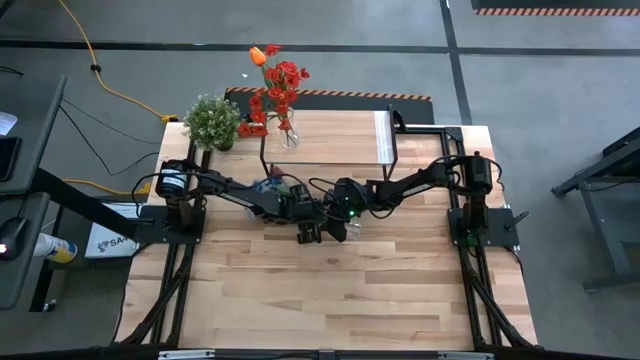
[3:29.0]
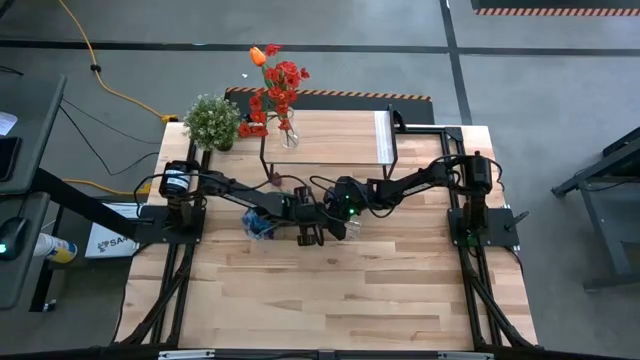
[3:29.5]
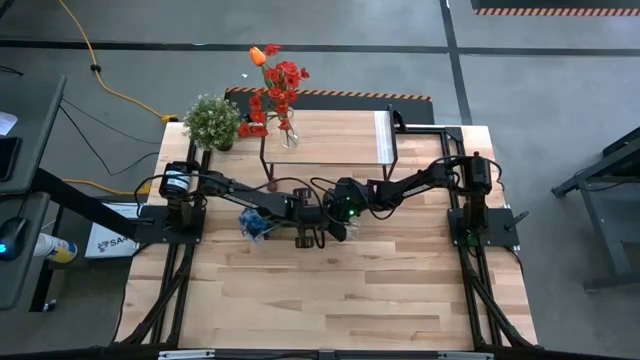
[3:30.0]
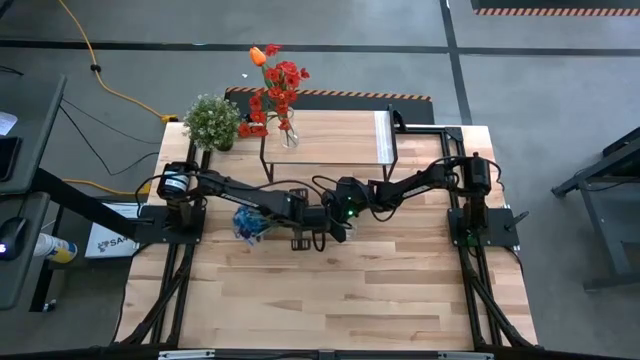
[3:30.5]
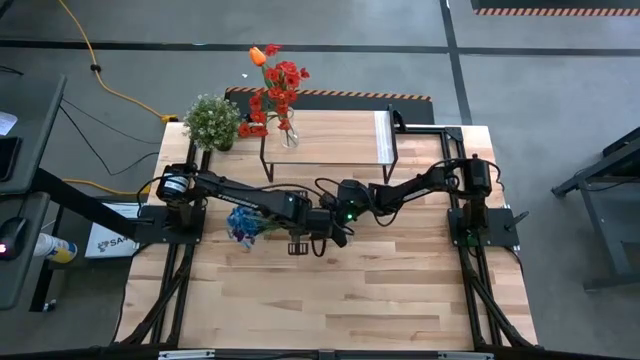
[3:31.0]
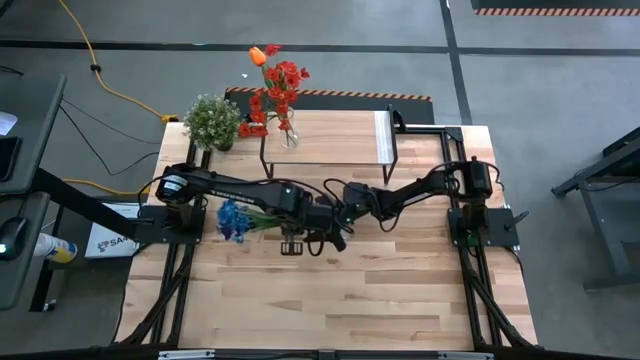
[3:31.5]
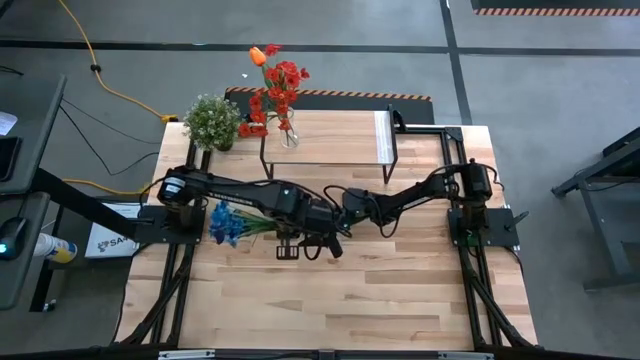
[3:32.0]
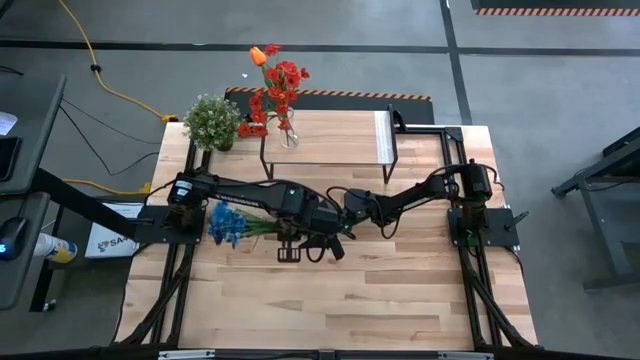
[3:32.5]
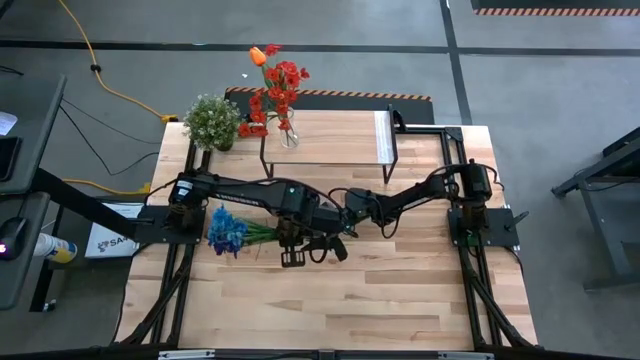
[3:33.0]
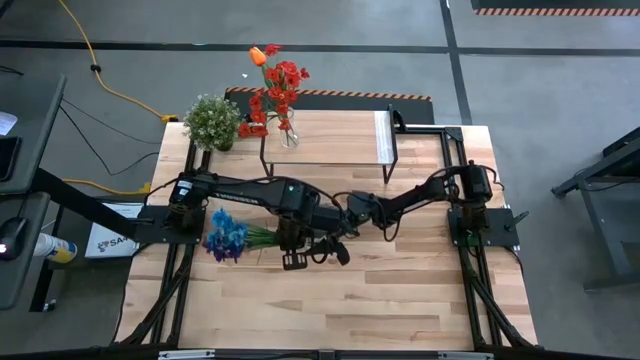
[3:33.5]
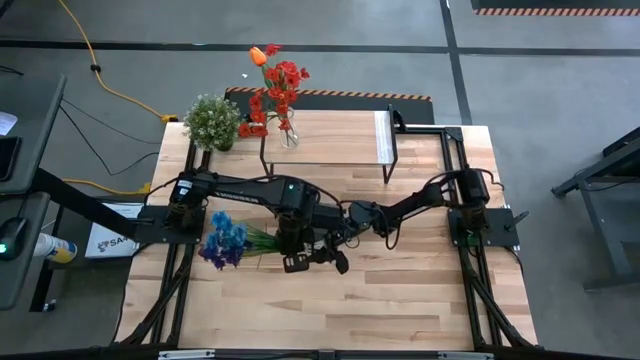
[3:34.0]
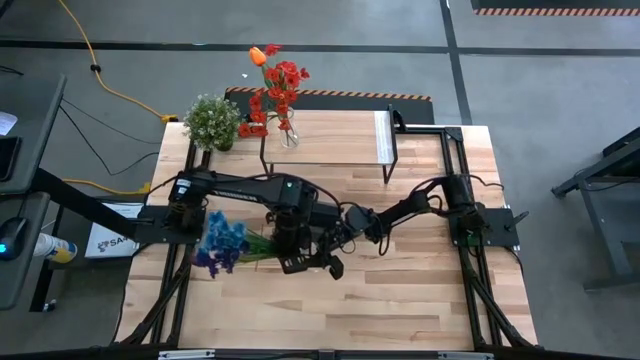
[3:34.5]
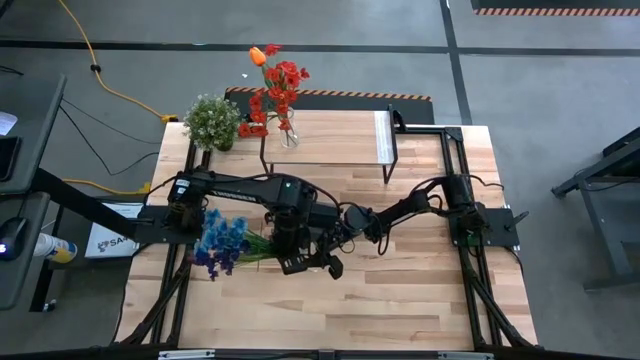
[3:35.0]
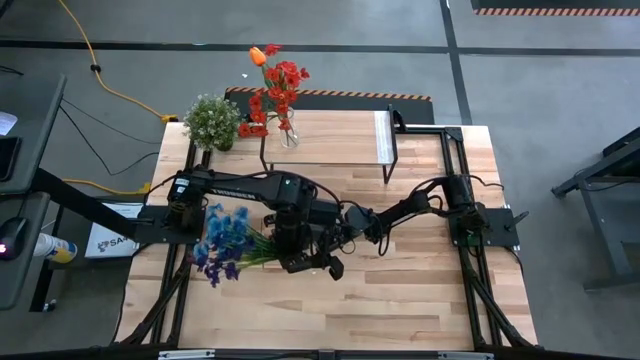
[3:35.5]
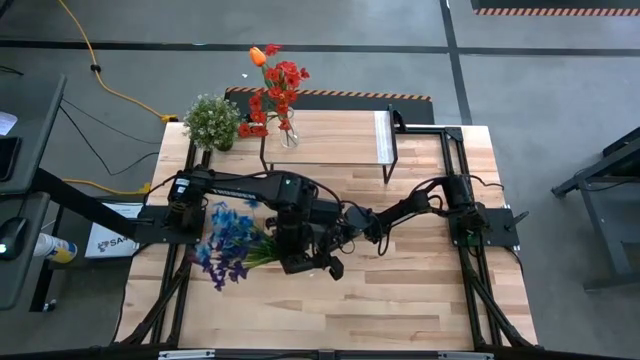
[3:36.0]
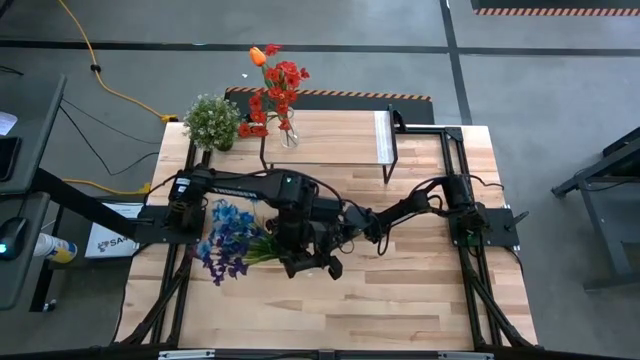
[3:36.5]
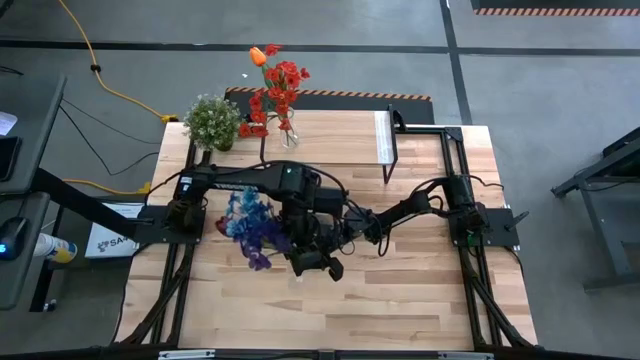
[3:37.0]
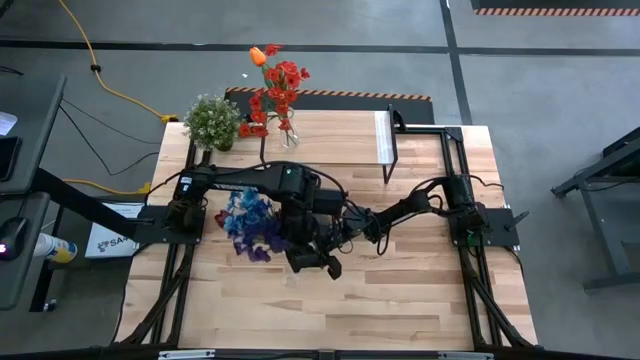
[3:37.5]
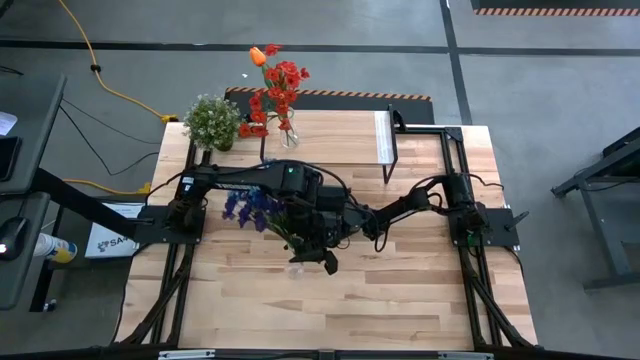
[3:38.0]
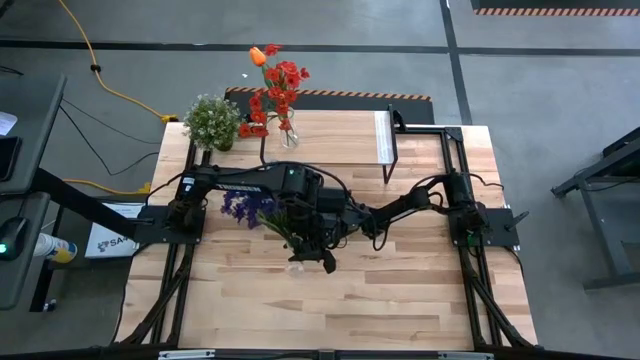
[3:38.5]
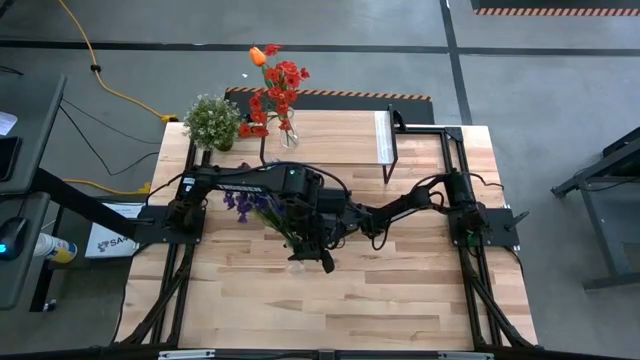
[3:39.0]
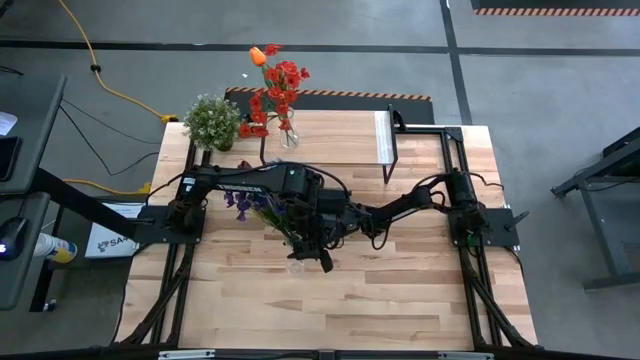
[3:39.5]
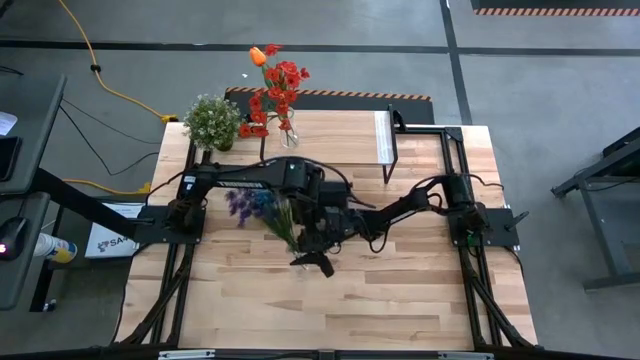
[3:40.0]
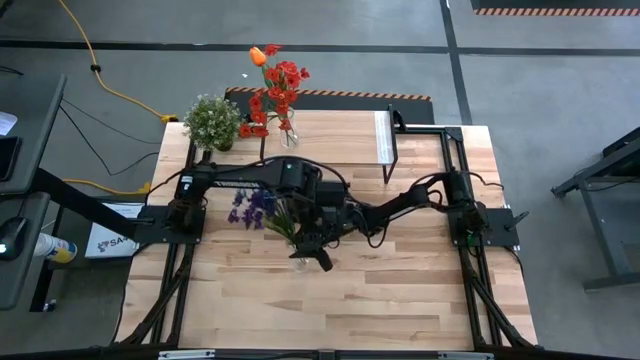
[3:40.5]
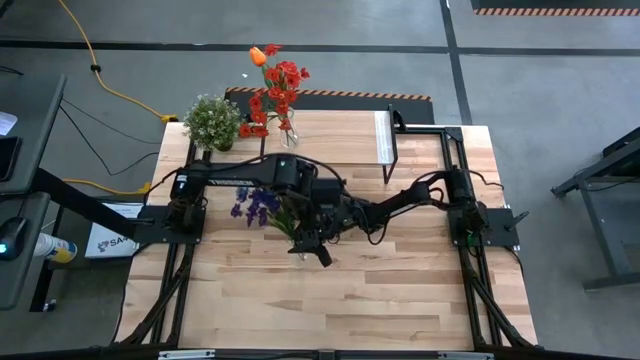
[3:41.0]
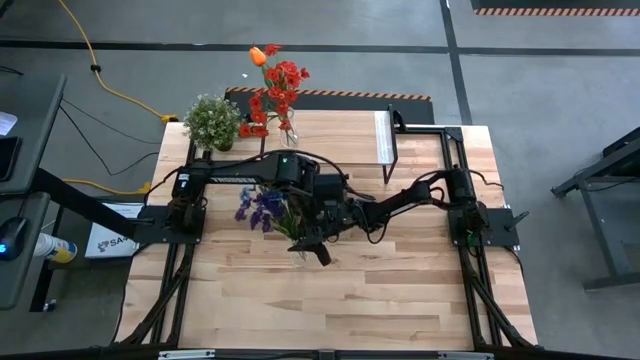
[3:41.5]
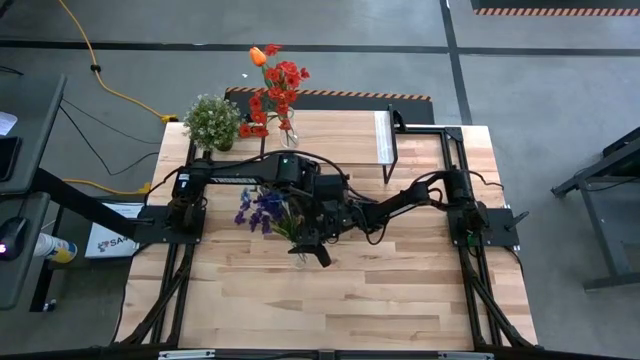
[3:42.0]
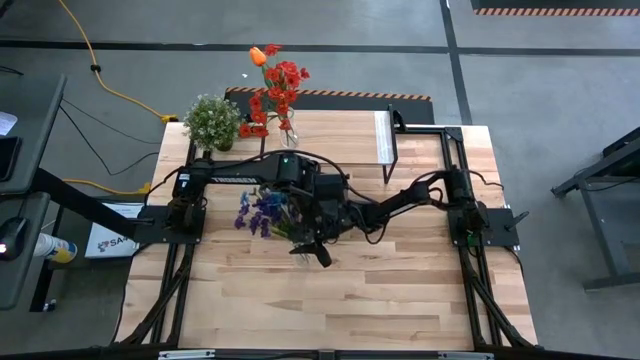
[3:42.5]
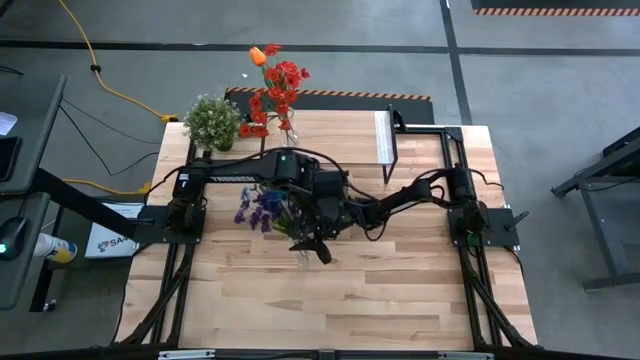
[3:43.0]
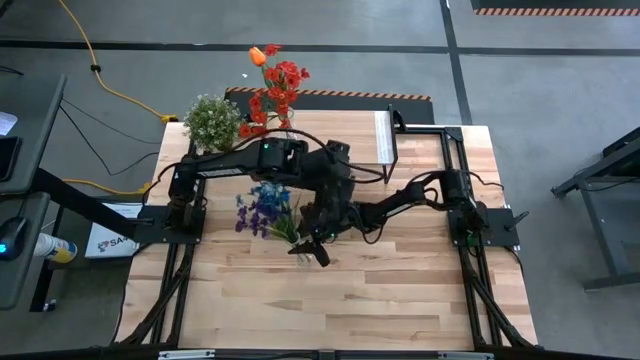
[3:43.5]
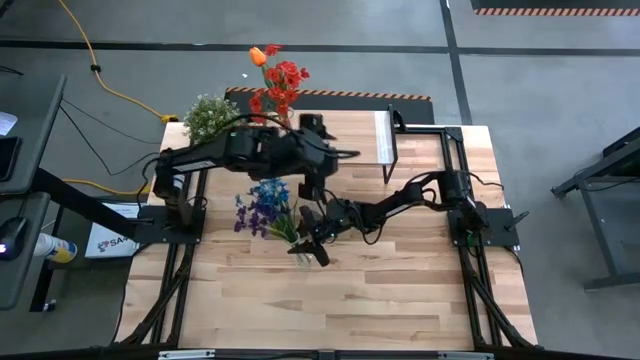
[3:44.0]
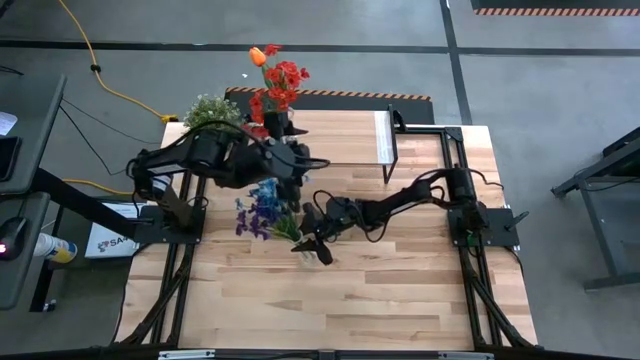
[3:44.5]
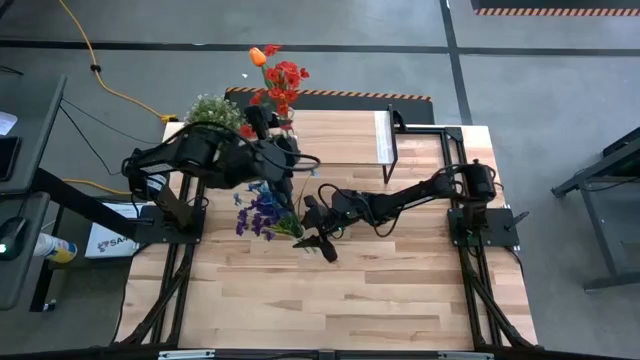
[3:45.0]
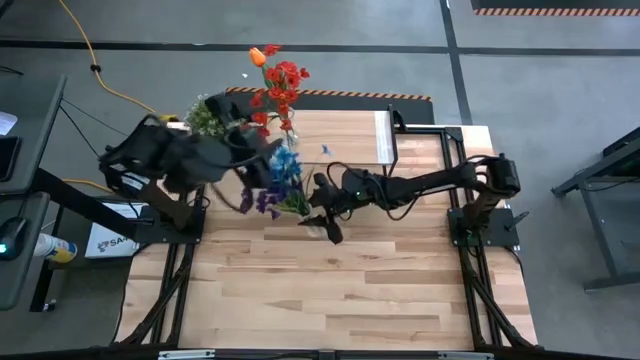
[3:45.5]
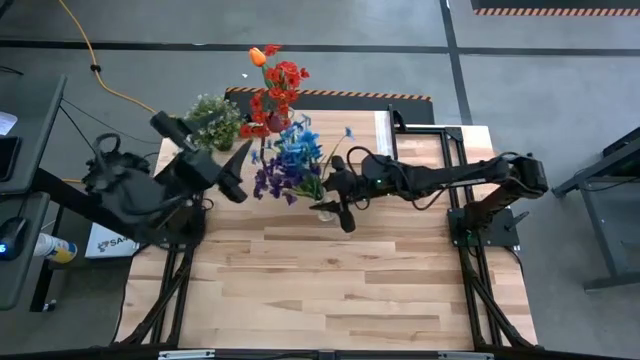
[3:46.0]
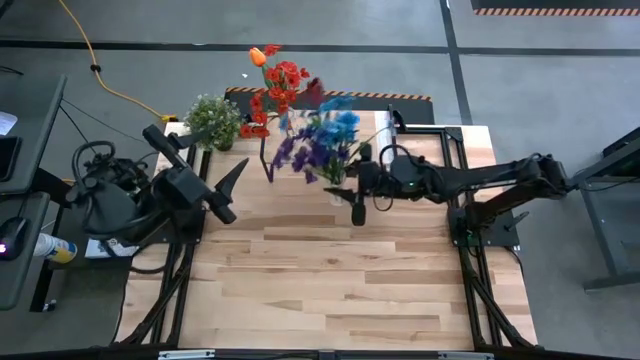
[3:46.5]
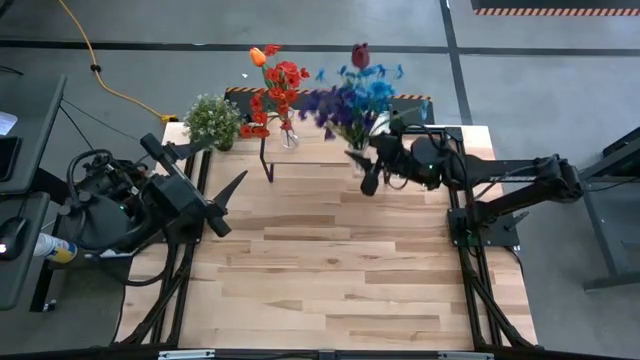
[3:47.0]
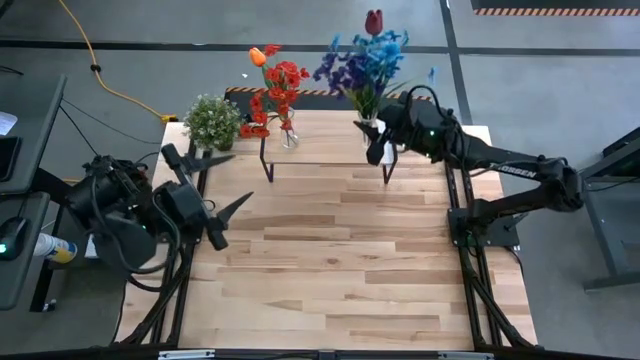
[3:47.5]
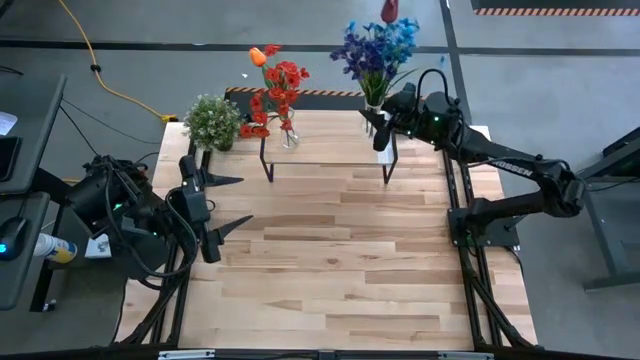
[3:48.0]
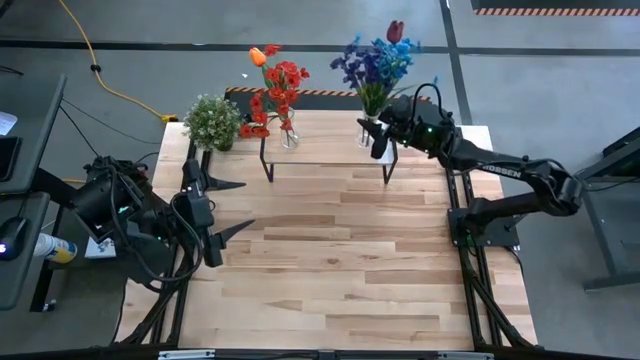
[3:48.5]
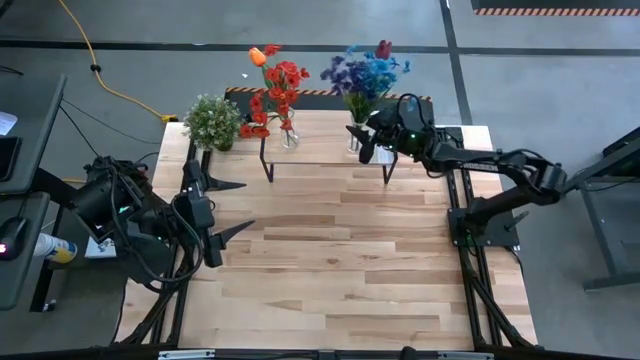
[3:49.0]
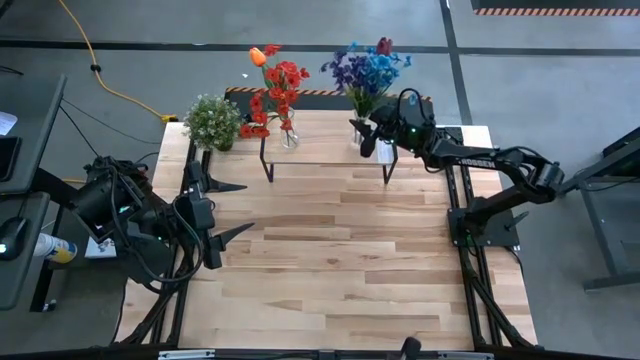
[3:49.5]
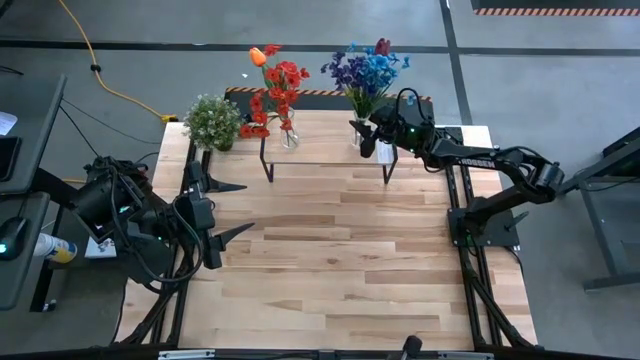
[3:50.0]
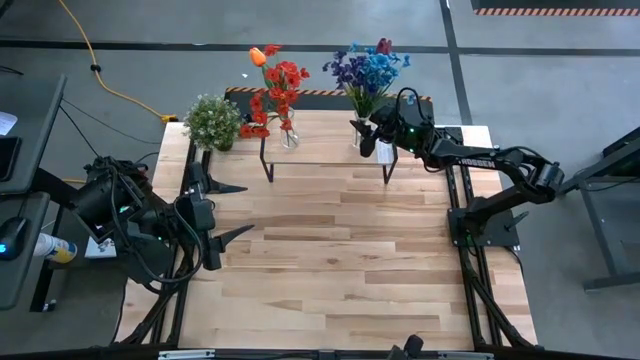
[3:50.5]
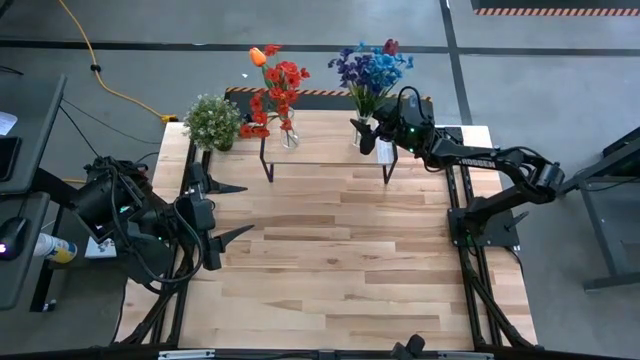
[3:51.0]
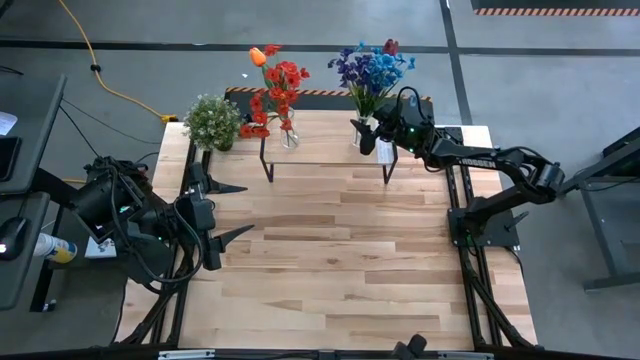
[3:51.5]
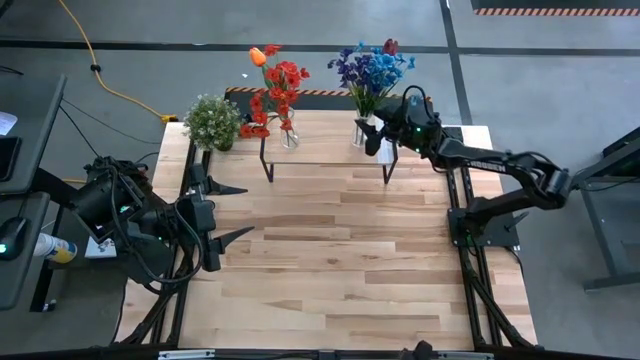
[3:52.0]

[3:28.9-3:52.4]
Task: Pick and place flowers into a vace then onto a shelf
Put the right transparent vase on the shelf
